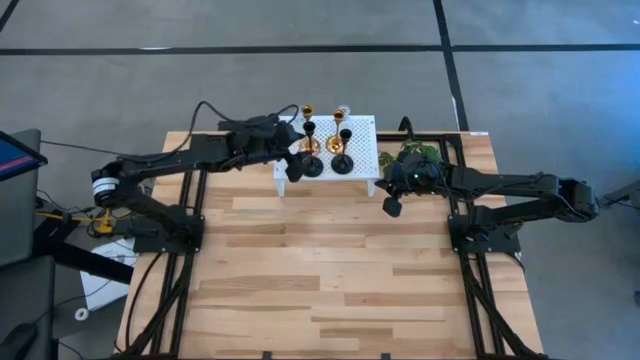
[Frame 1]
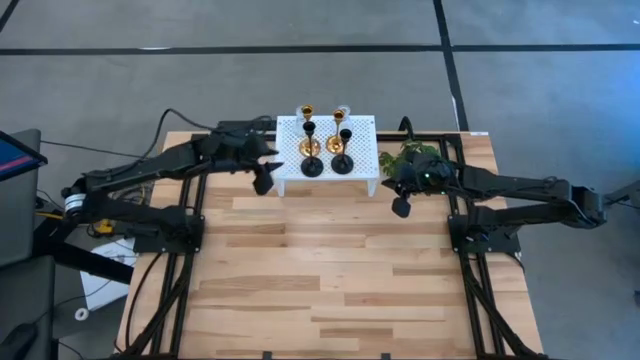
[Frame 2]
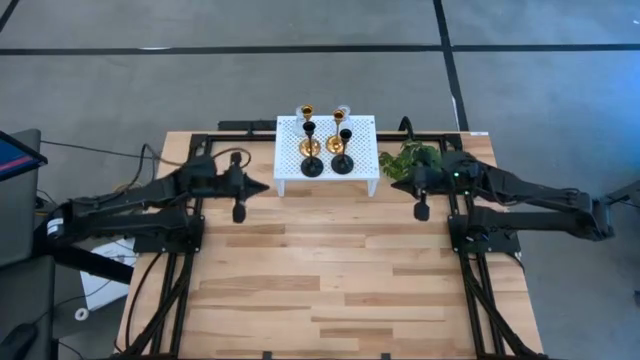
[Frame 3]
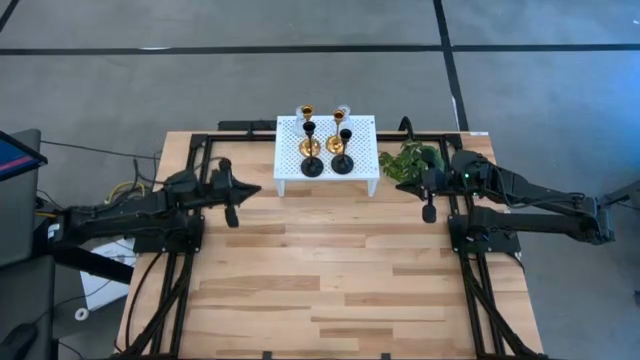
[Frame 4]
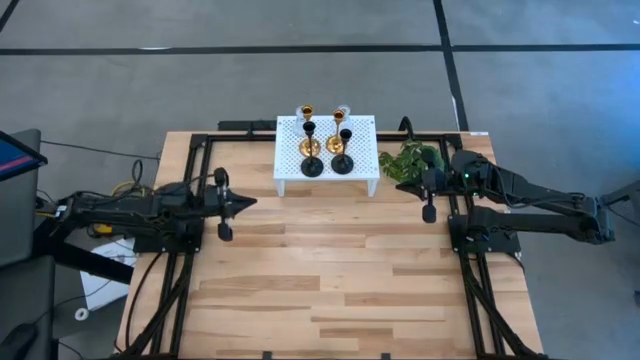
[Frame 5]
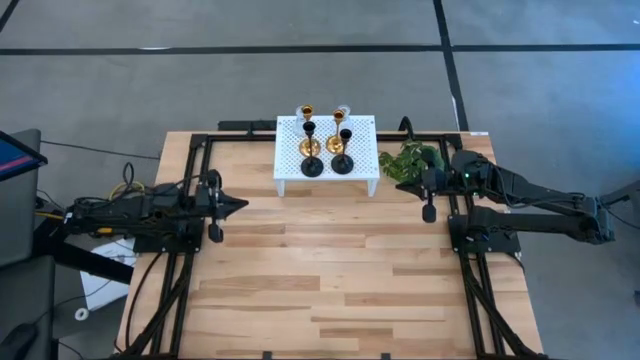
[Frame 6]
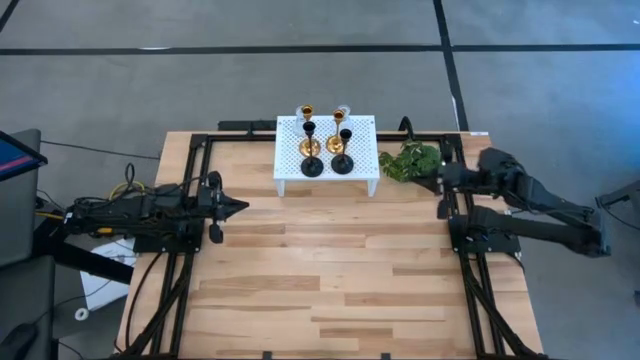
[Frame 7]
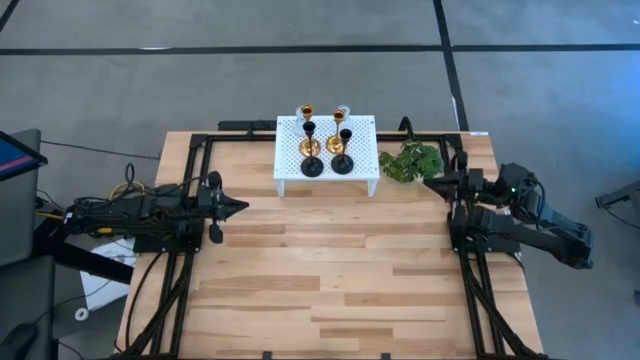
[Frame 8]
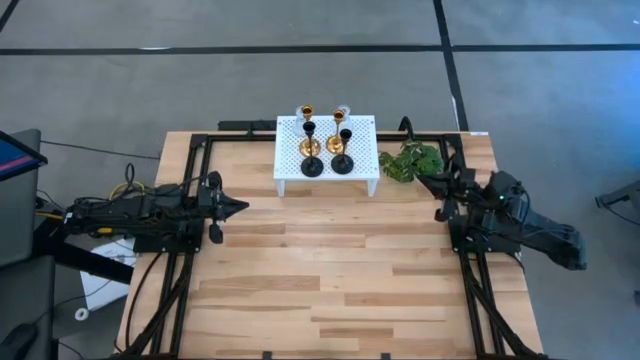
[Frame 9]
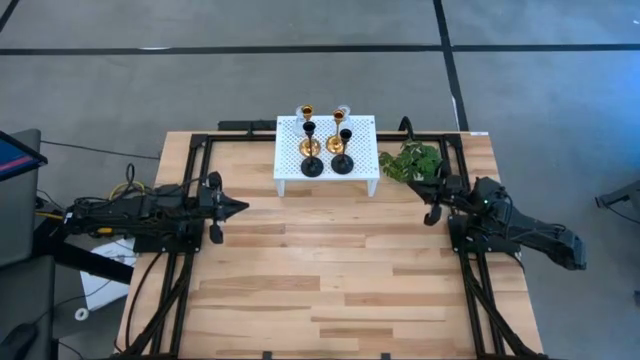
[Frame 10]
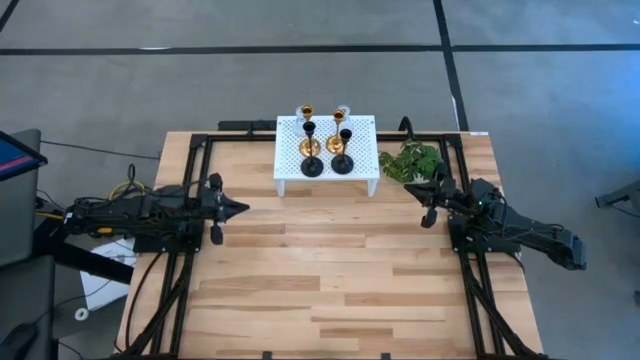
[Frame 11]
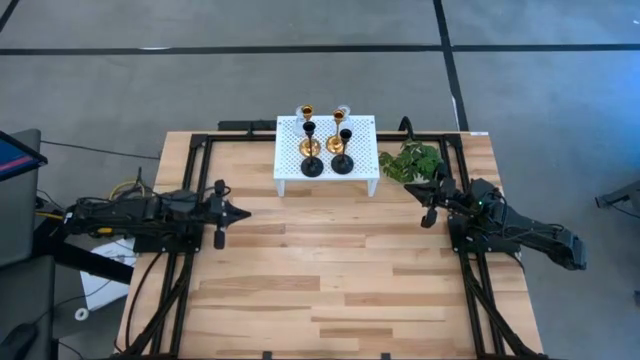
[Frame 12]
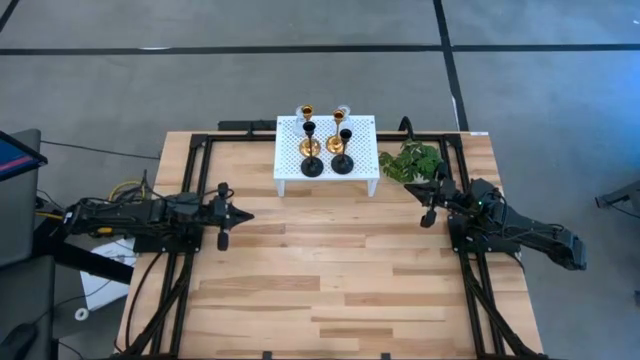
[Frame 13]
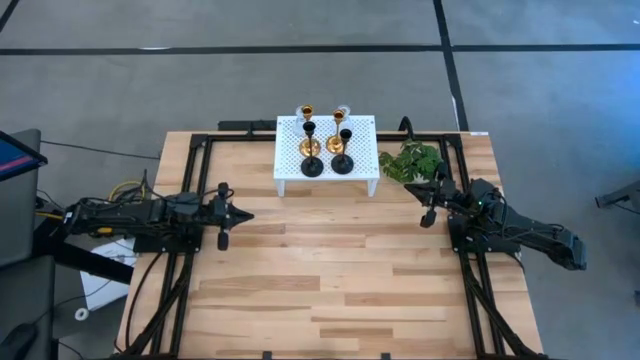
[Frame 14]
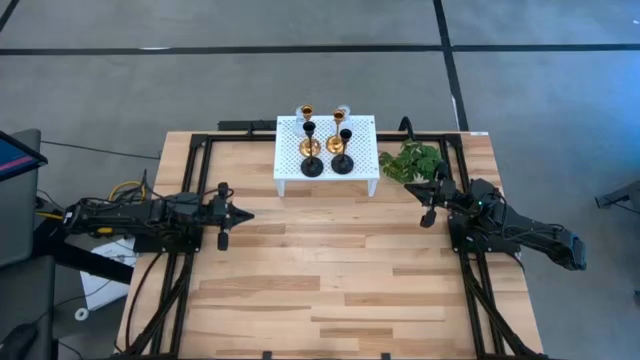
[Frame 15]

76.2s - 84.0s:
Task: Pick & Place candle stick holders
Return to Home Position

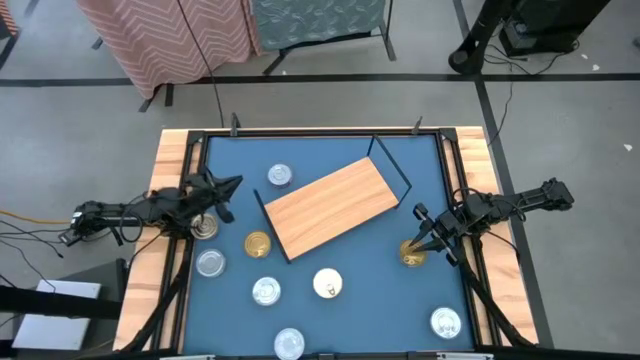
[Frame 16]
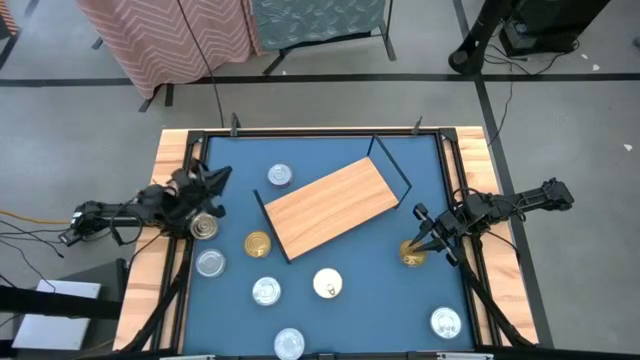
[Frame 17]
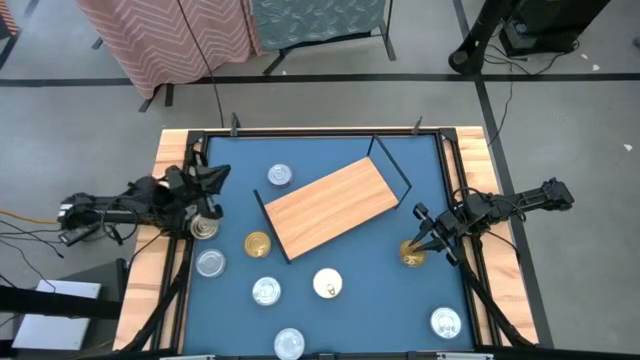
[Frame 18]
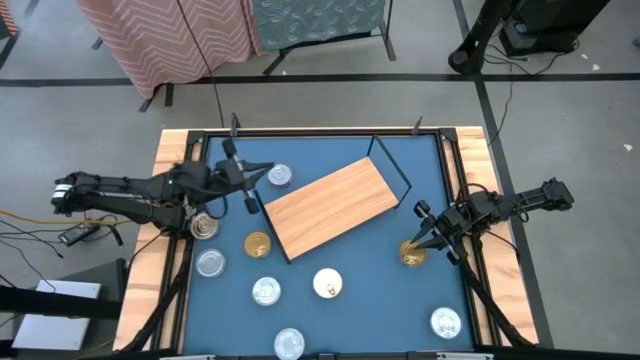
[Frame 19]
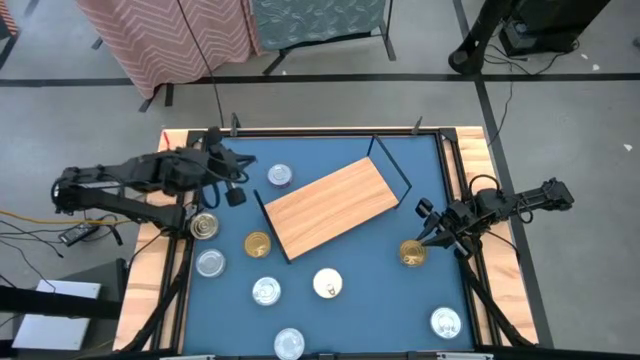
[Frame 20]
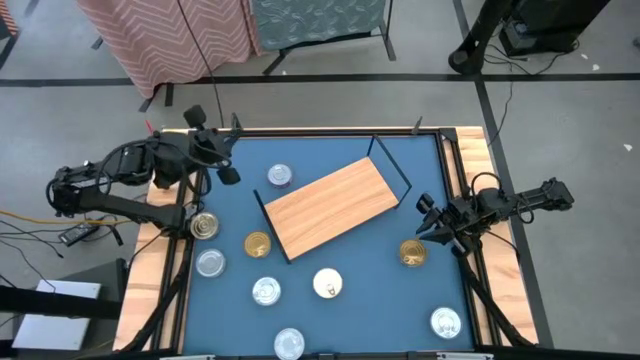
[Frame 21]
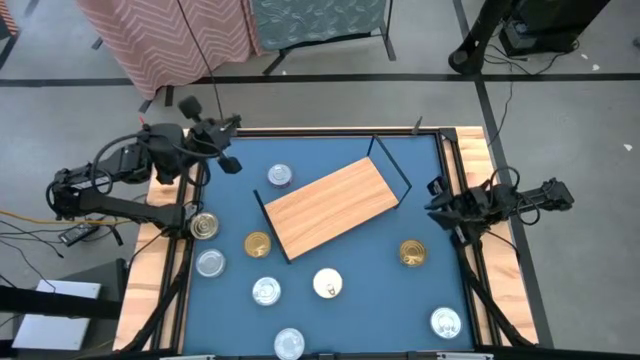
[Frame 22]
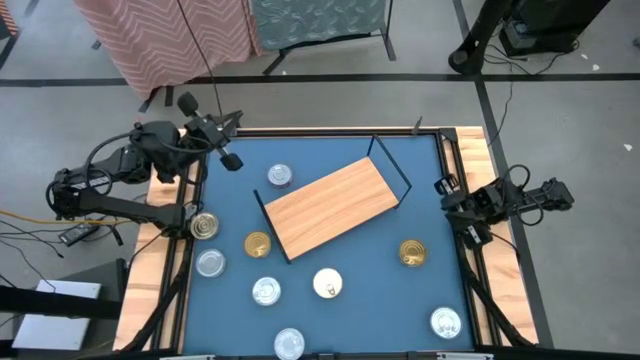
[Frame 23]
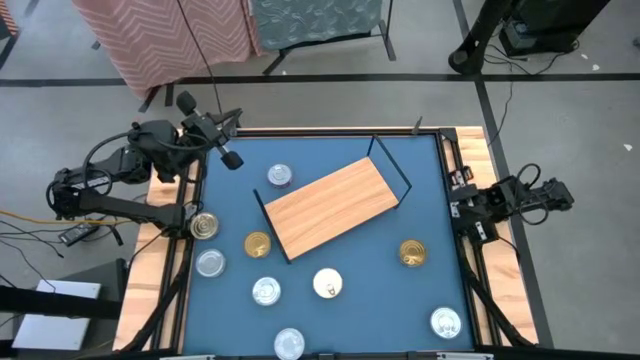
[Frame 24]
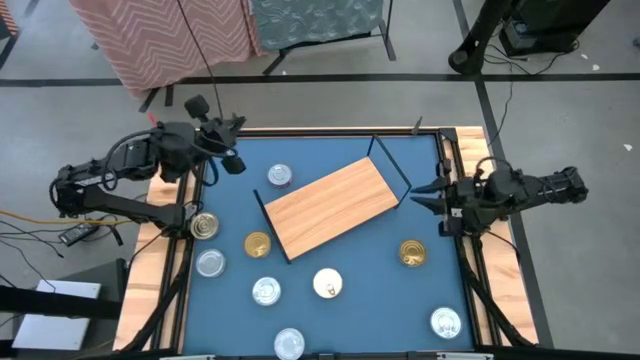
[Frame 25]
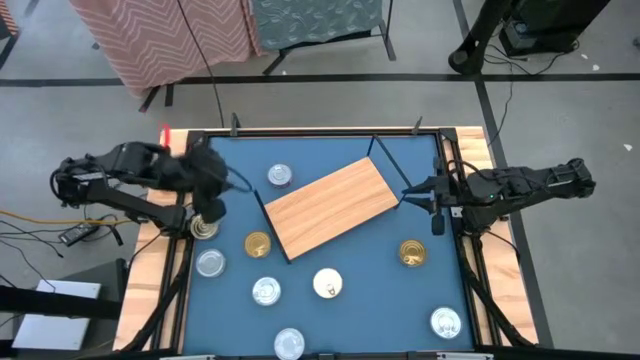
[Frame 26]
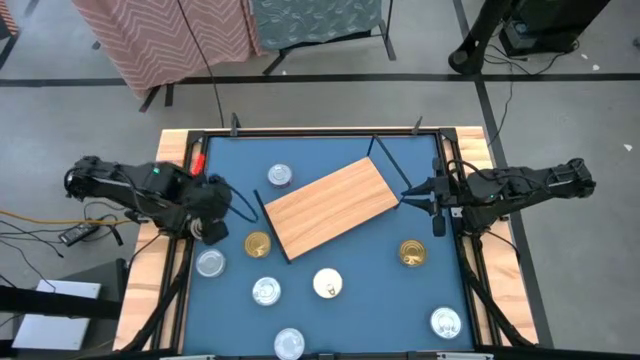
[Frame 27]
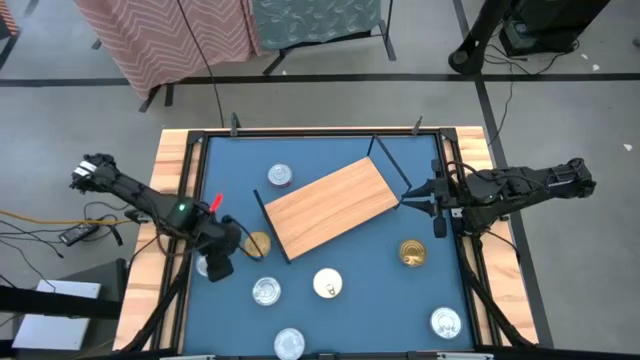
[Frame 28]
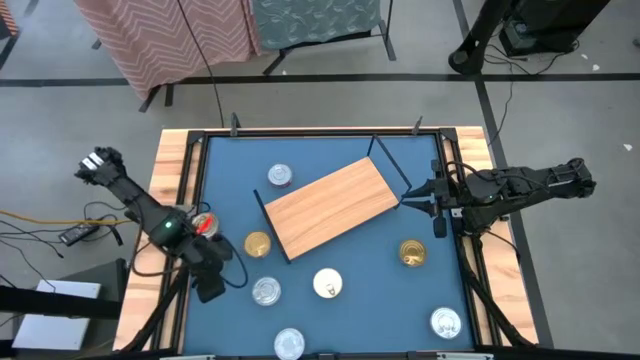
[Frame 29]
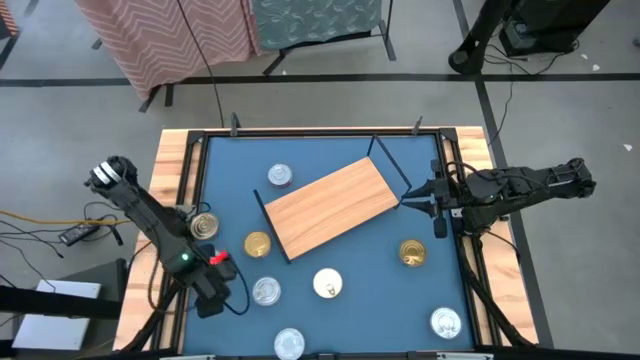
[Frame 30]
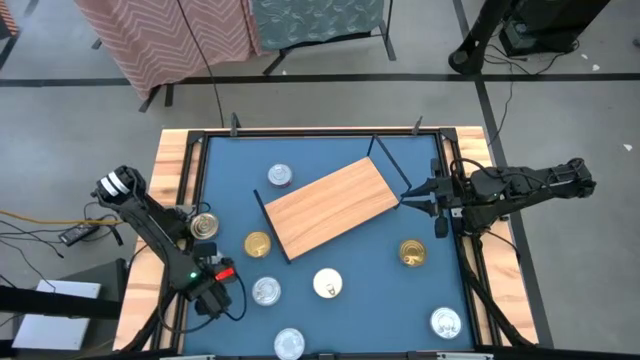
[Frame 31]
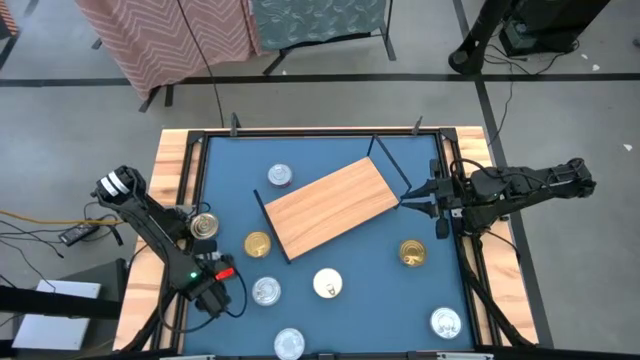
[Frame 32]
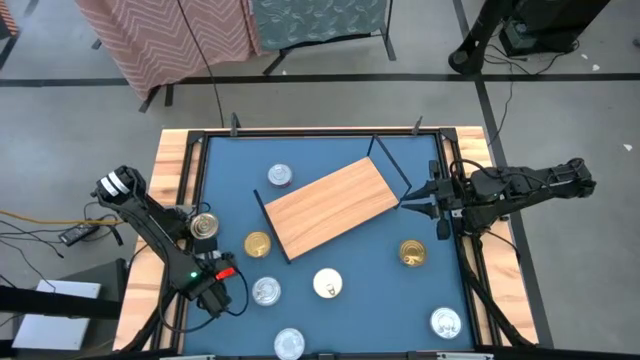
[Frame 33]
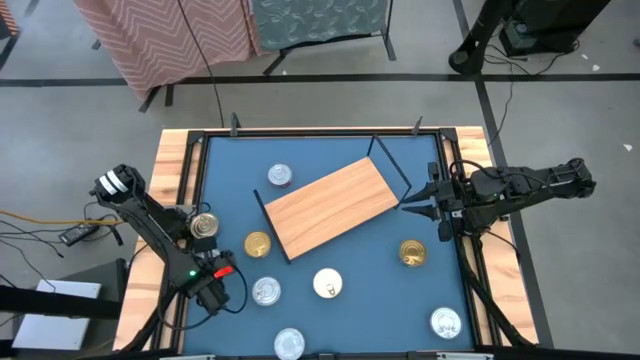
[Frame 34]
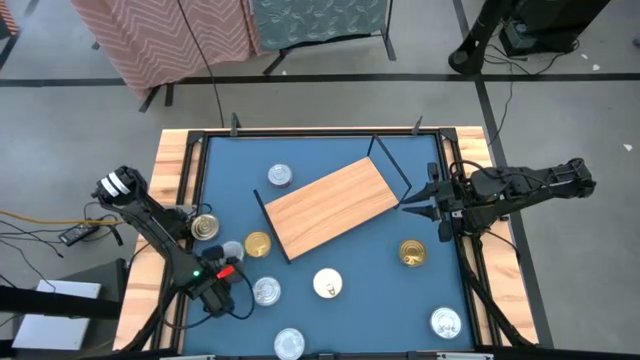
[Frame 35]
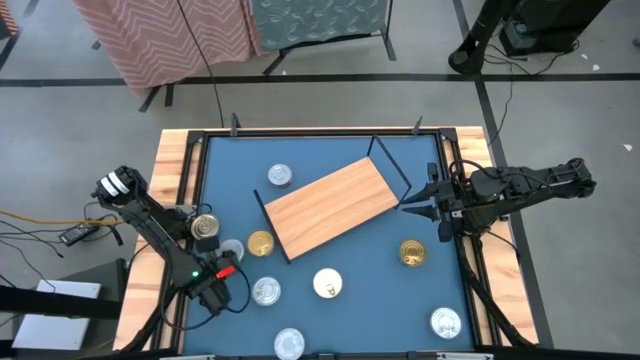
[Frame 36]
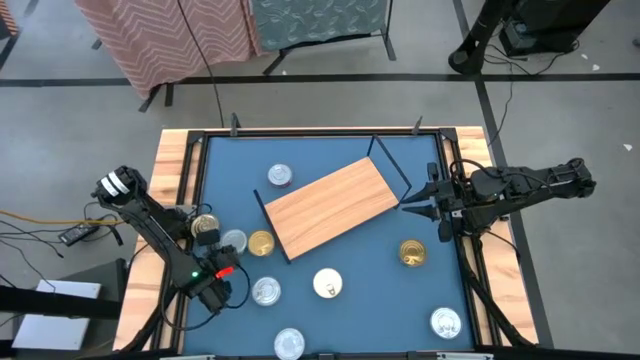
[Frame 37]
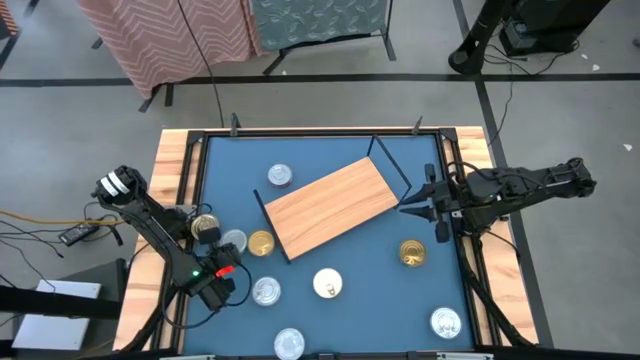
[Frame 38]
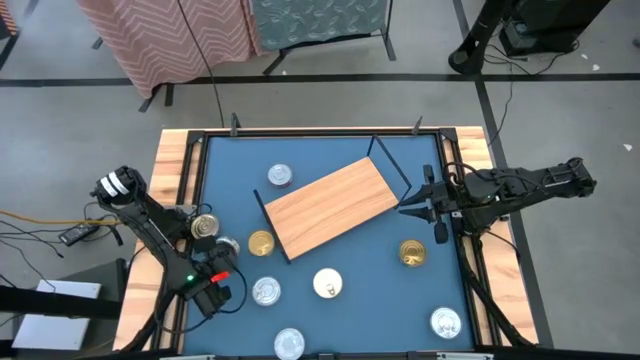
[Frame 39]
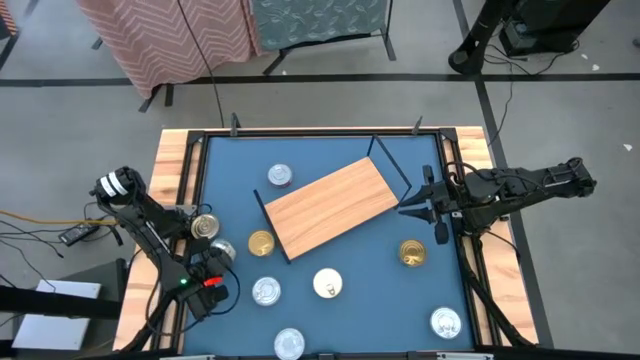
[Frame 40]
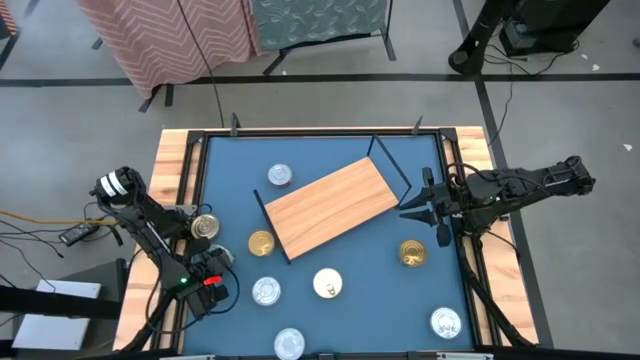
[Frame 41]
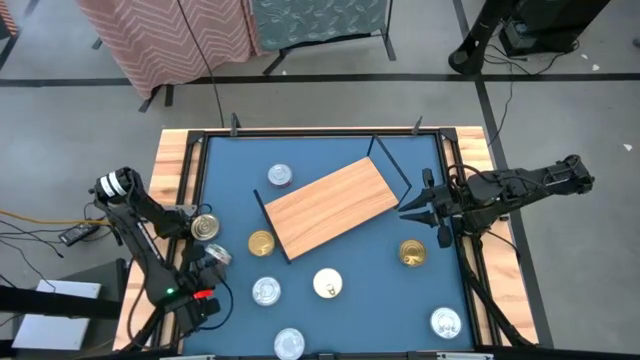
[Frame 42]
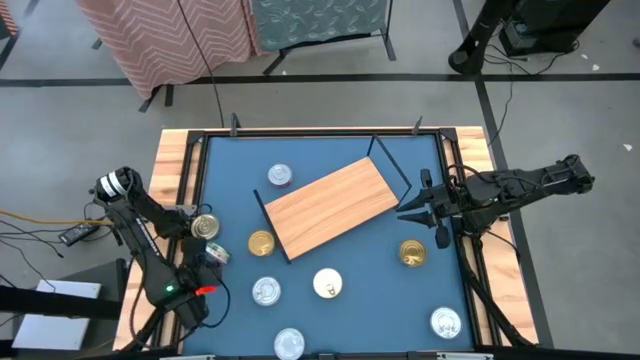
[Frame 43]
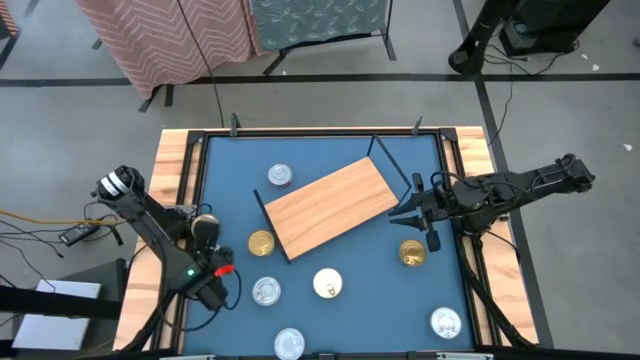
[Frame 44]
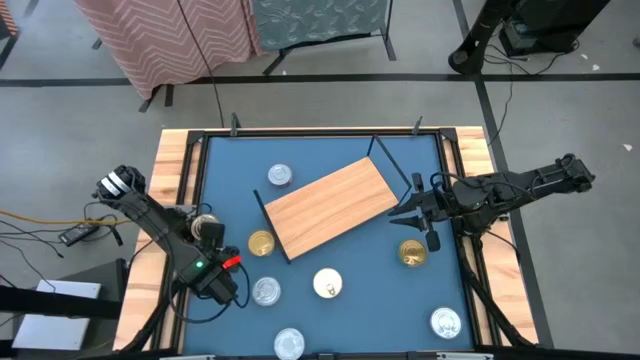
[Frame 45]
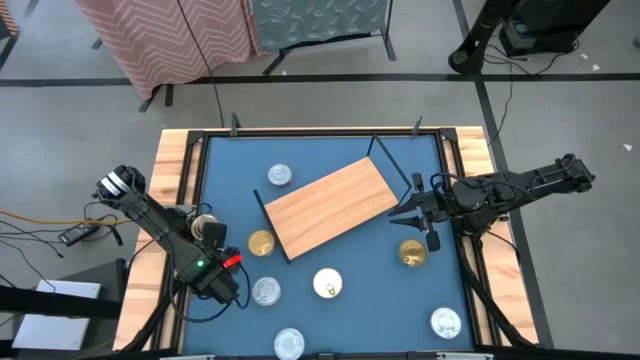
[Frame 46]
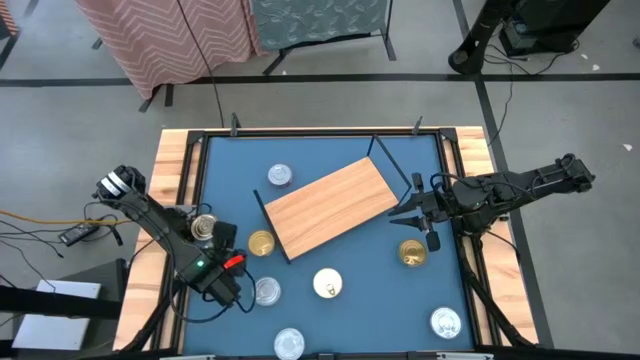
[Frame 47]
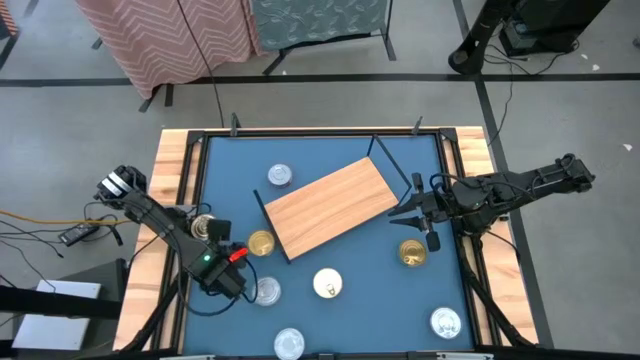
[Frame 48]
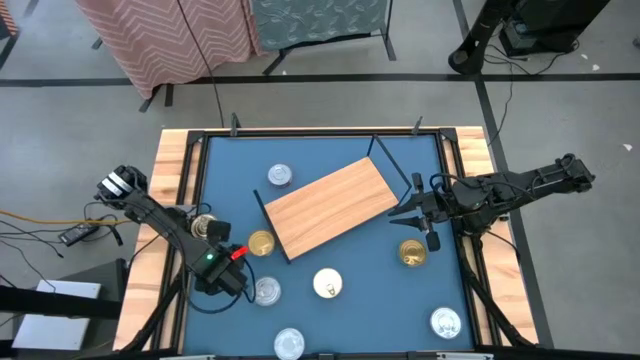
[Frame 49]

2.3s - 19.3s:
Task: Stack canned seafood by type on shelf
Put the green tuna can on the shelf
